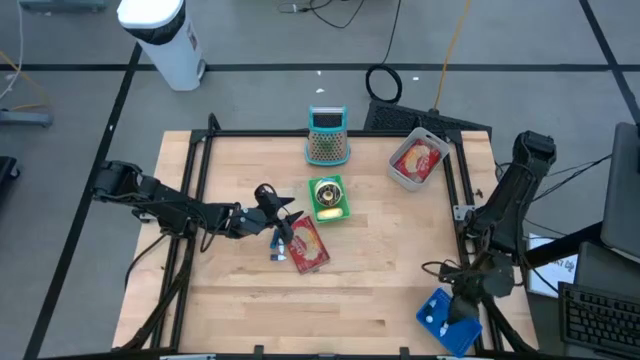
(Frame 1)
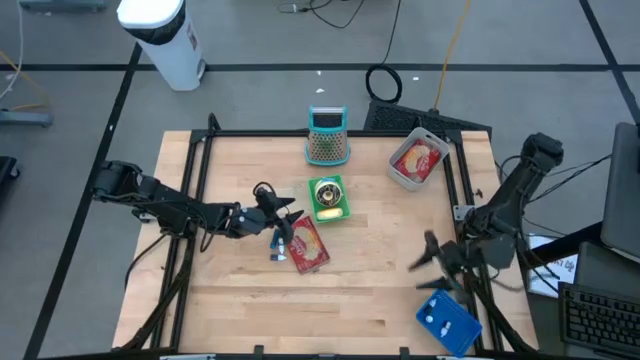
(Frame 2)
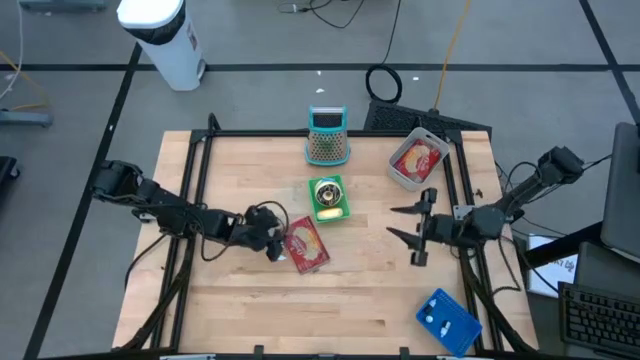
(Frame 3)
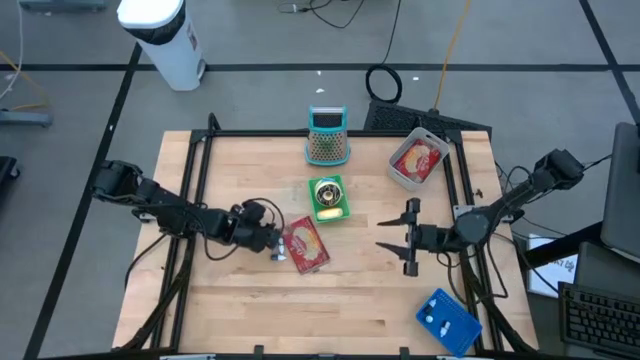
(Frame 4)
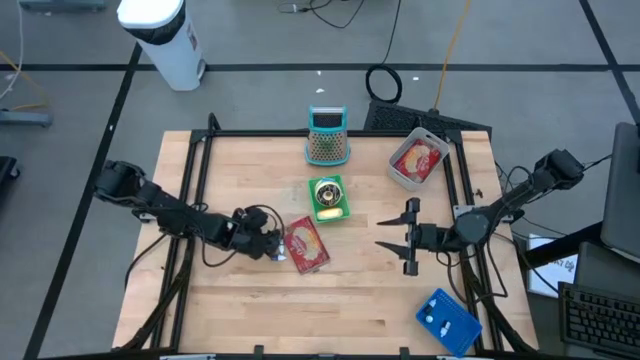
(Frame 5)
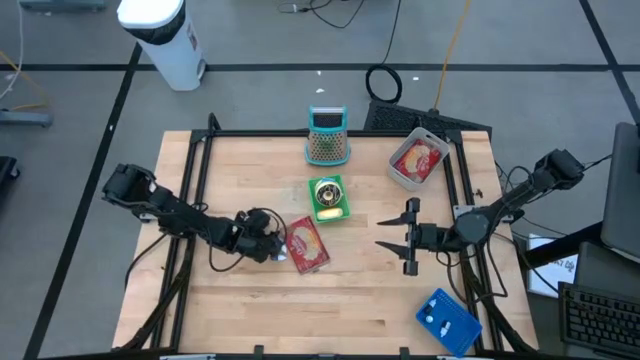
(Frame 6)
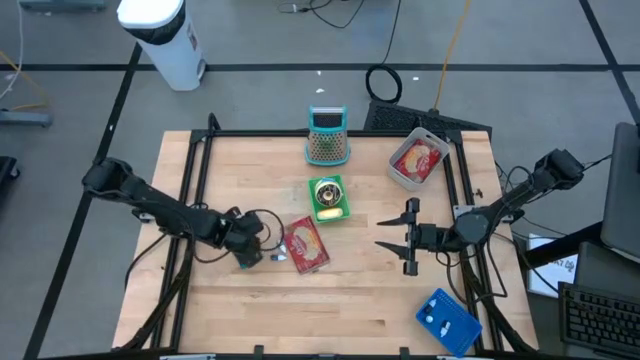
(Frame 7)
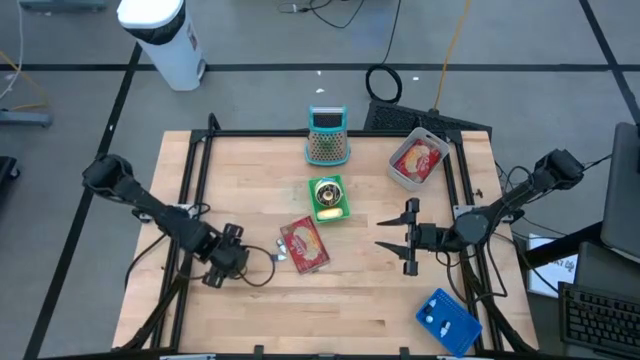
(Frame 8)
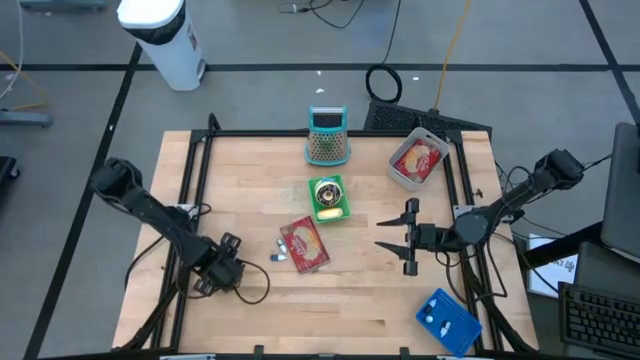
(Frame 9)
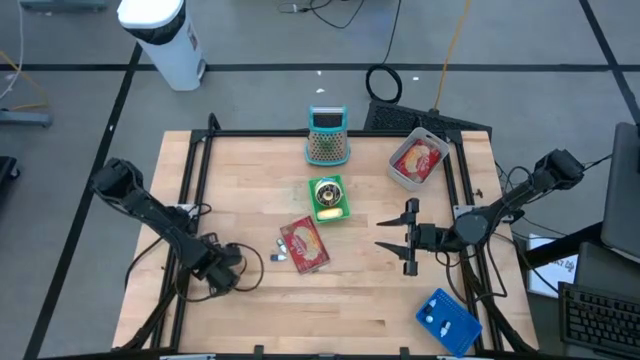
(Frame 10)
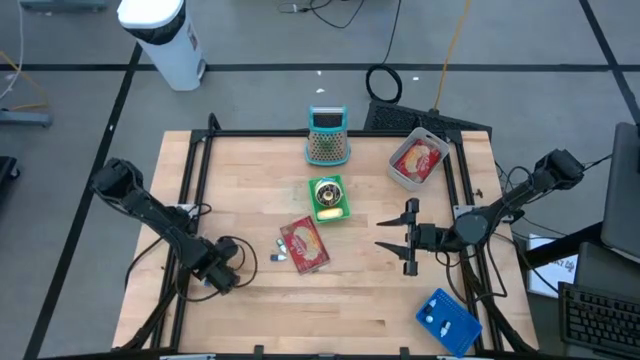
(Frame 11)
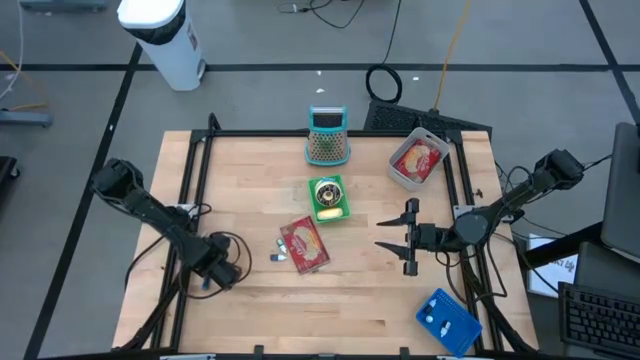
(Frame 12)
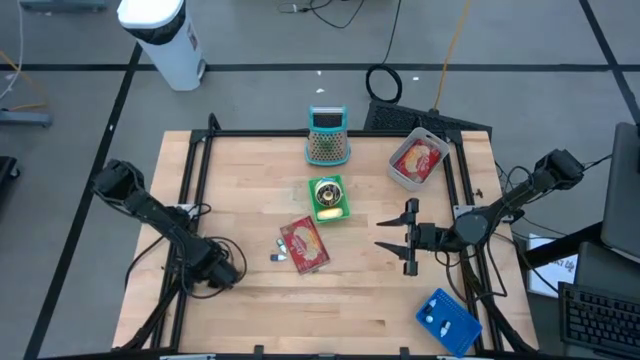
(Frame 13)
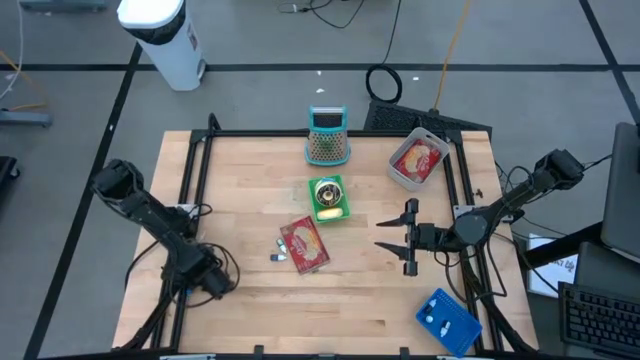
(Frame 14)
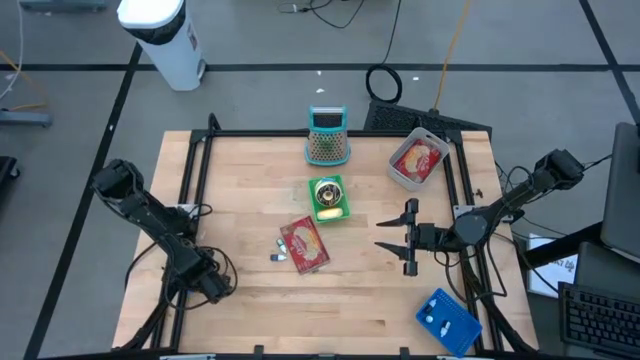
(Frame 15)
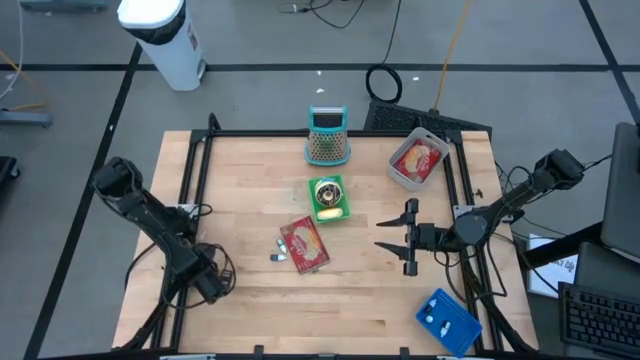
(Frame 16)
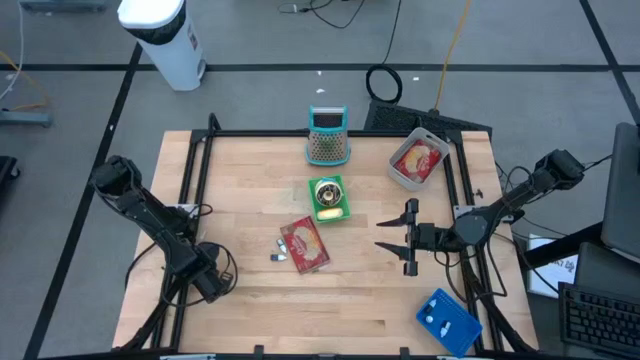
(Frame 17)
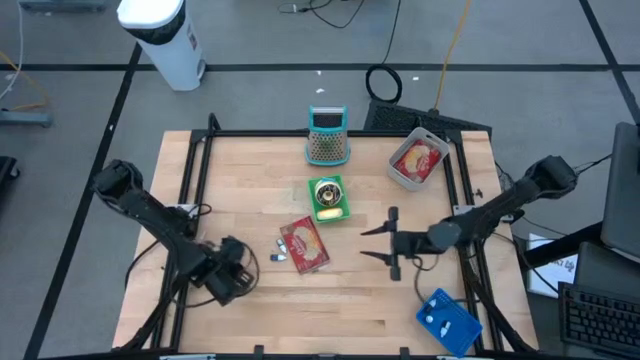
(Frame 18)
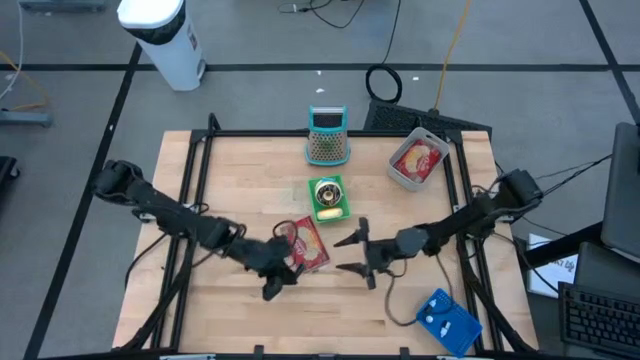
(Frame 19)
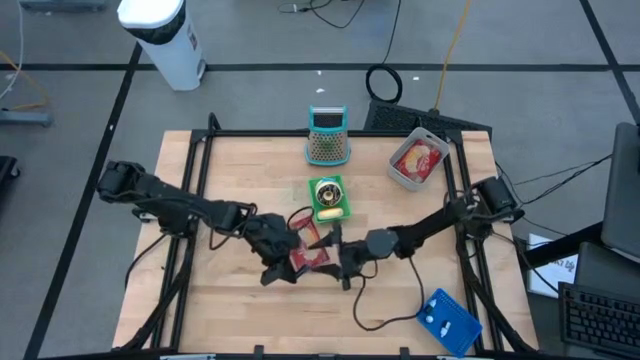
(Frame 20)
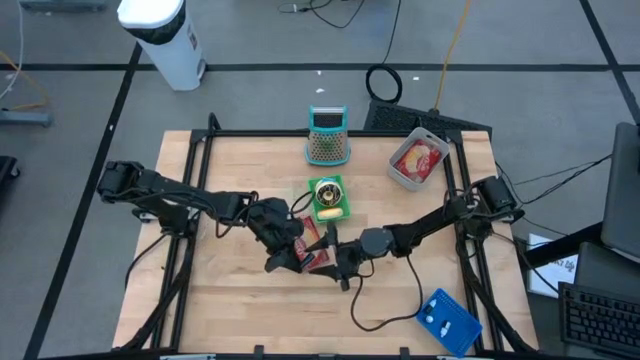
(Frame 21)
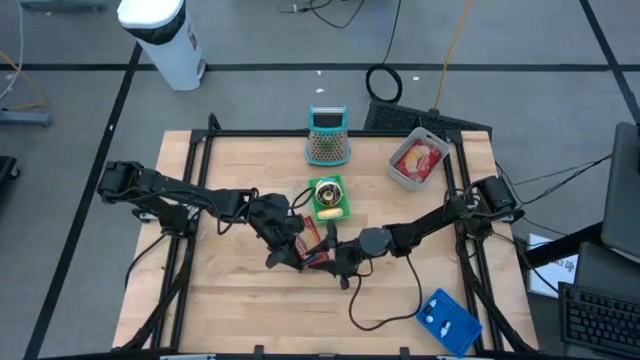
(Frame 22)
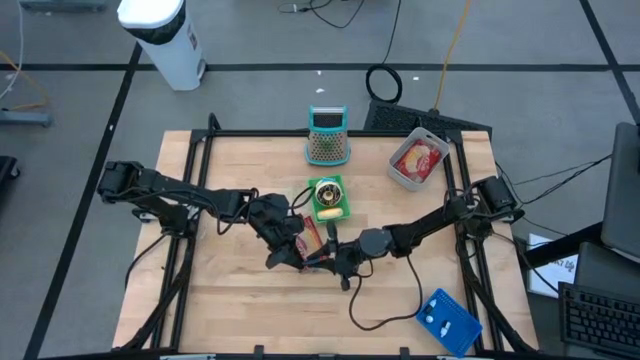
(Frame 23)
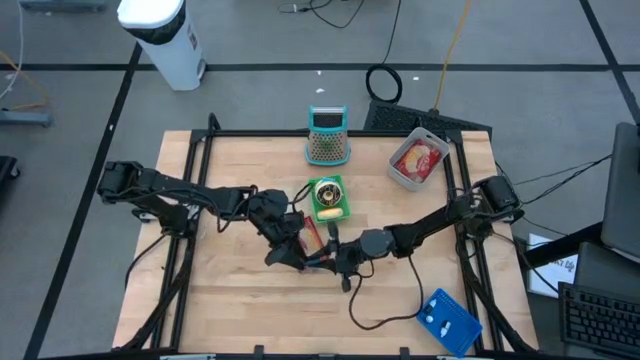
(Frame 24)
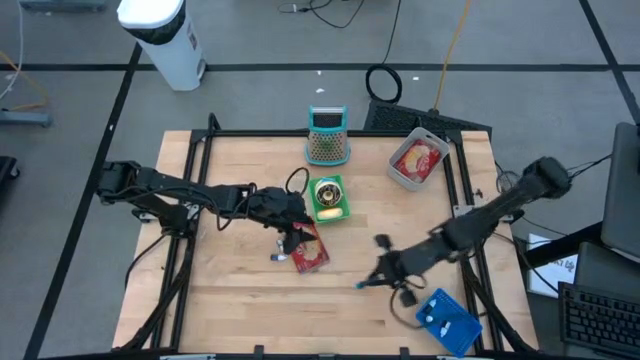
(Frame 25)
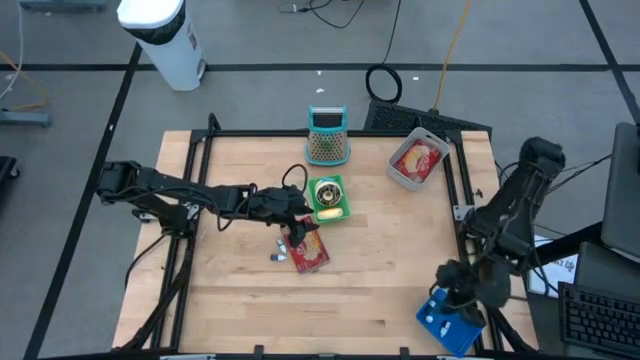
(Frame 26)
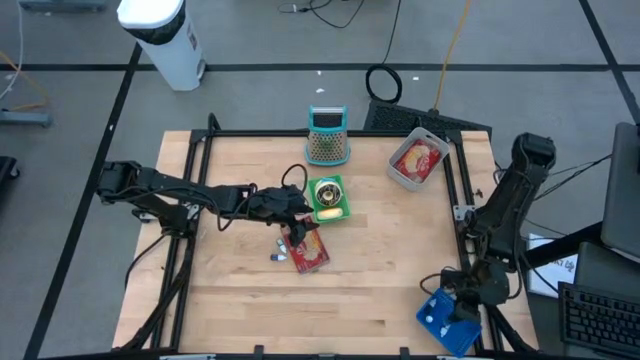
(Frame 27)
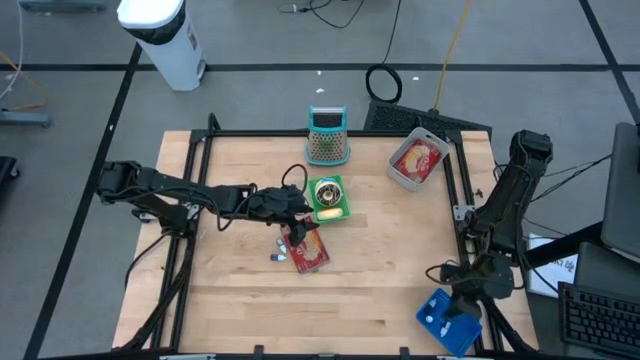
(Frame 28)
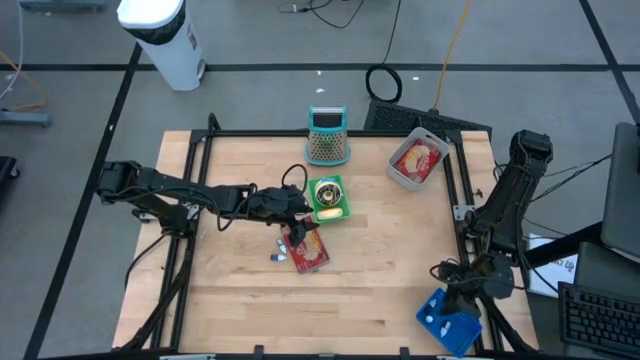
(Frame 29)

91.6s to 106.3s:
Put the left blue food coloring bottle into the blue bin
